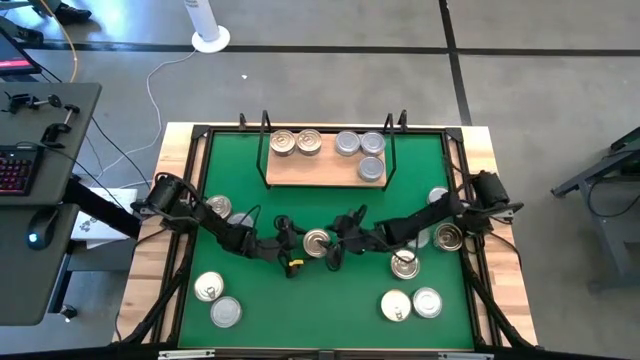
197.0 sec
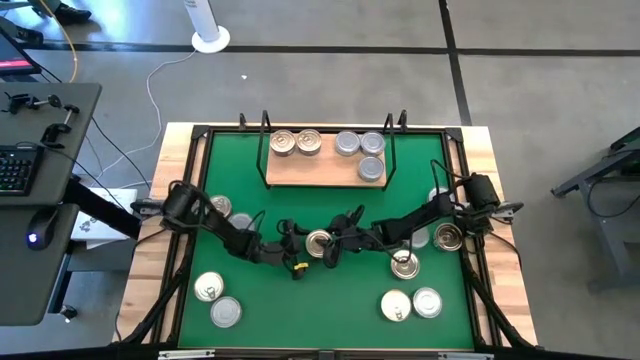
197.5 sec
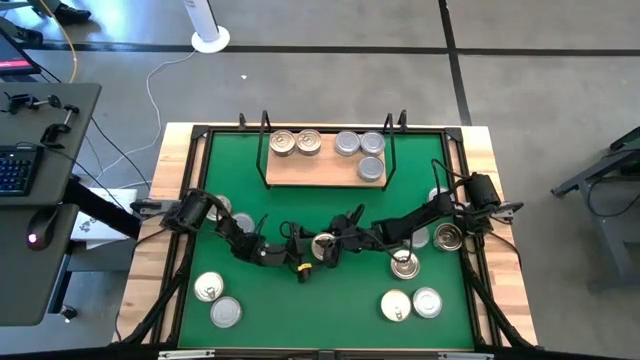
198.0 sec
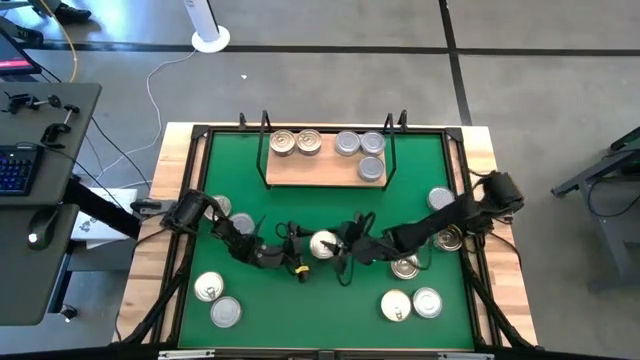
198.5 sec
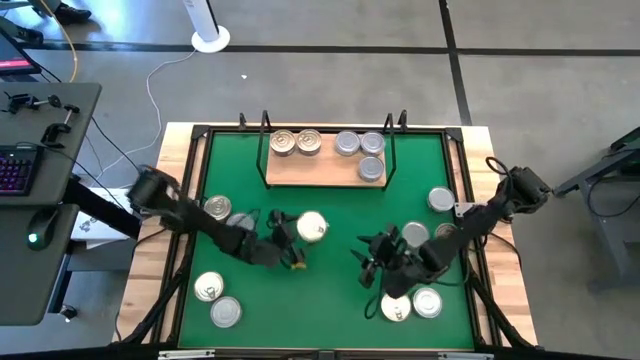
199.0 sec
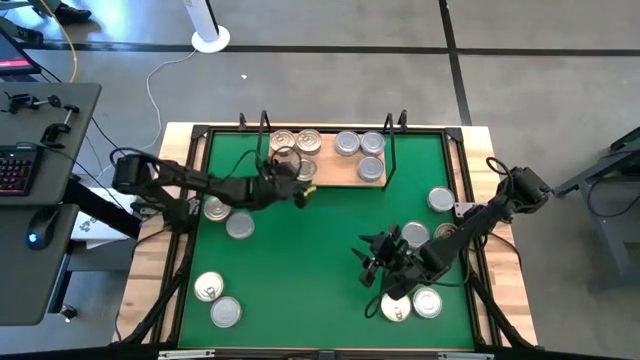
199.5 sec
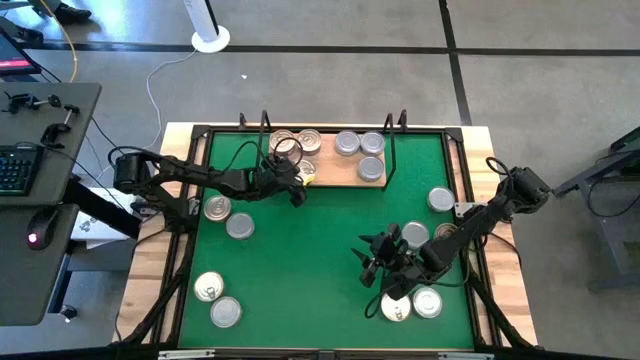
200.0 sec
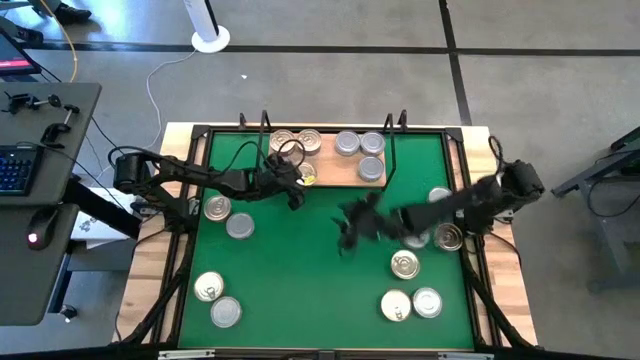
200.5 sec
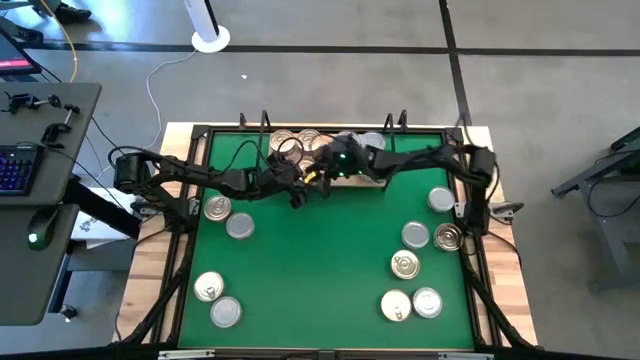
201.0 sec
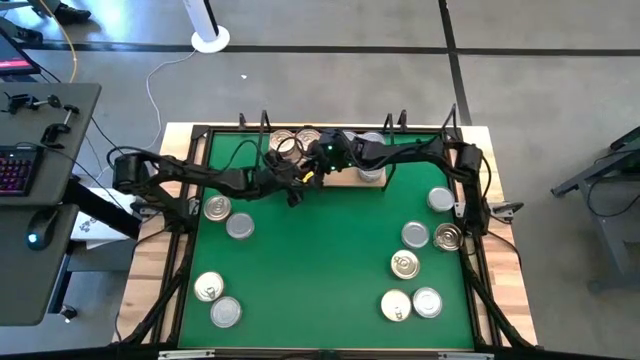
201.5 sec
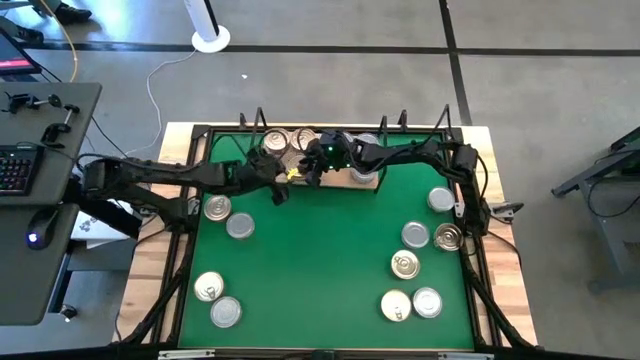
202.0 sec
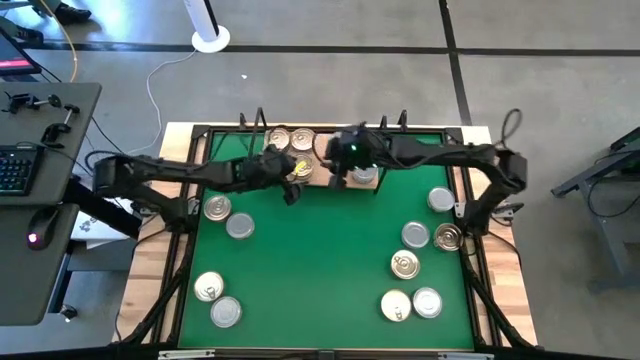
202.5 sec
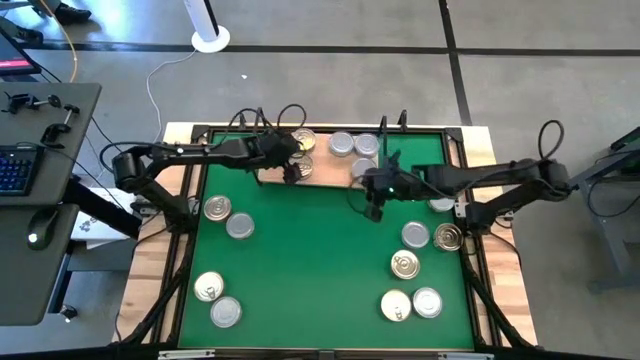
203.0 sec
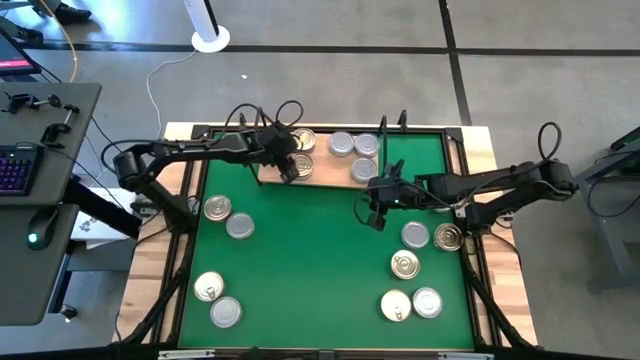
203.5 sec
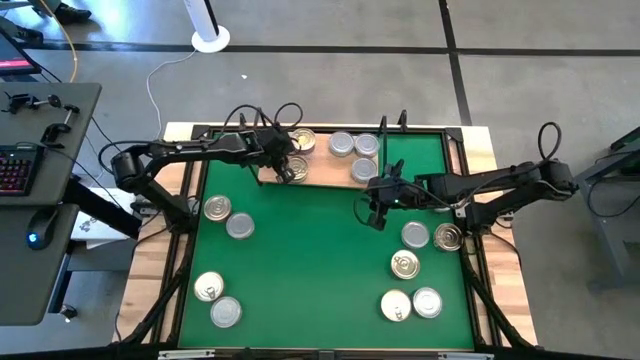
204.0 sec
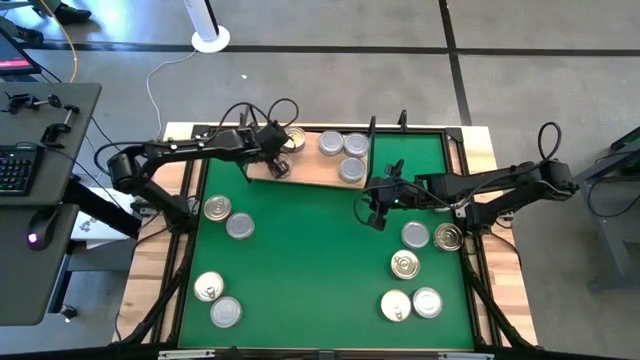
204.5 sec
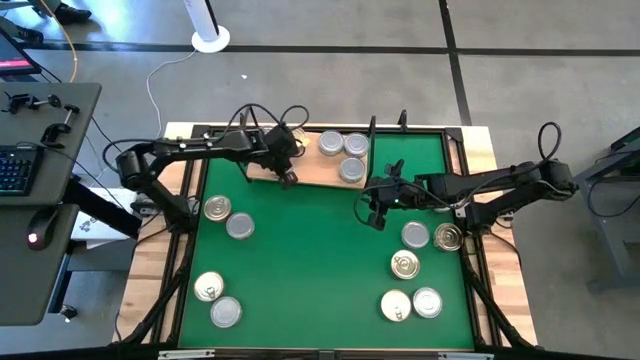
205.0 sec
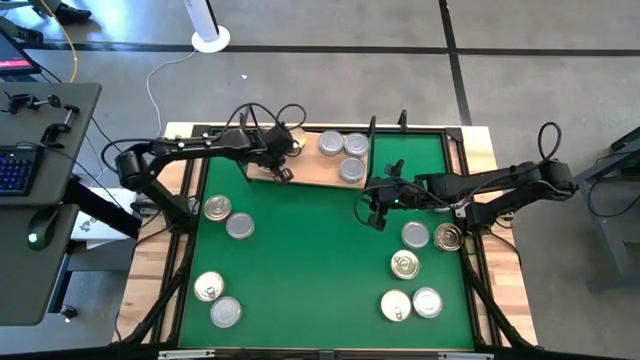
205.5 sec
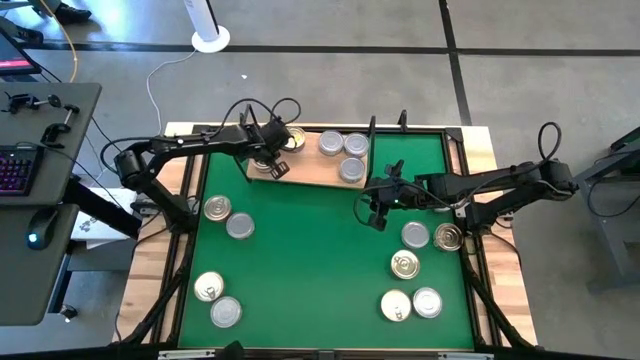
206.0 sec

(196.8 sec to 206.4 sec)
Task: Stack canned seafood by type on shelf
Put the blue/pink tuna can on the shelf and align with the other blue/pink tuna can

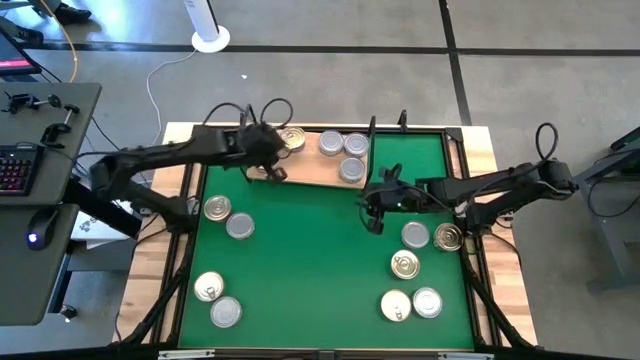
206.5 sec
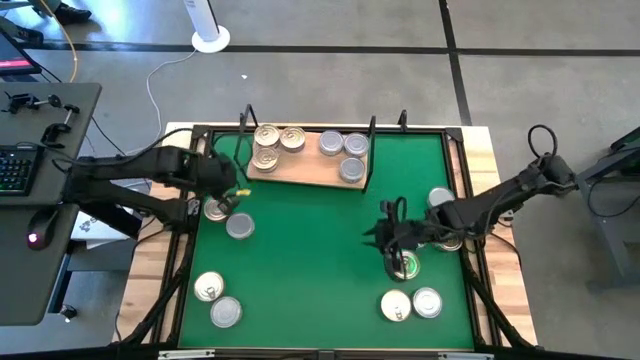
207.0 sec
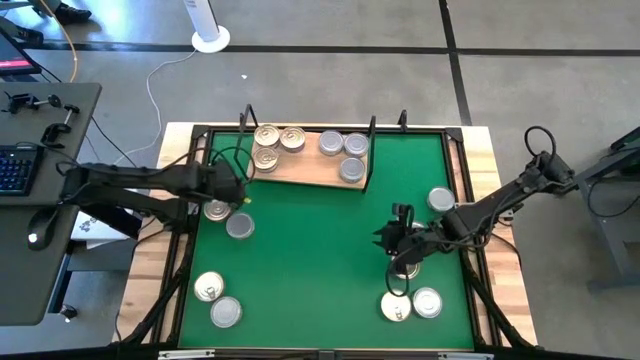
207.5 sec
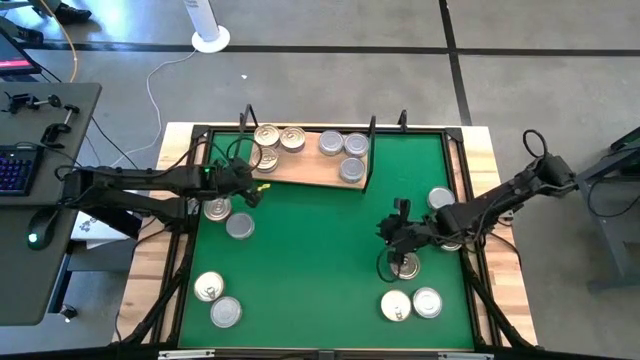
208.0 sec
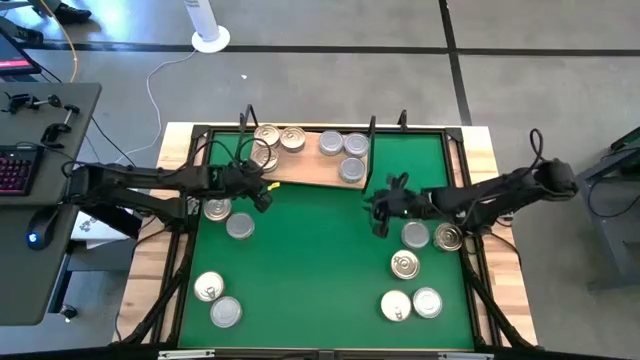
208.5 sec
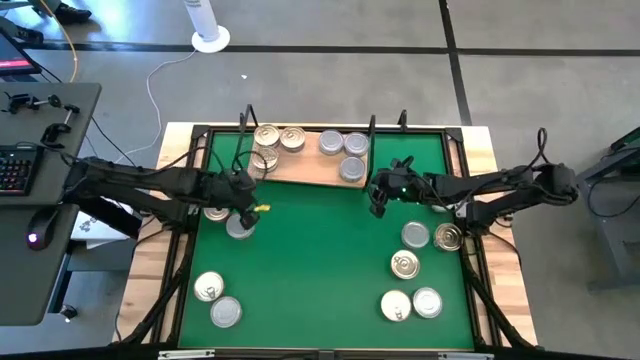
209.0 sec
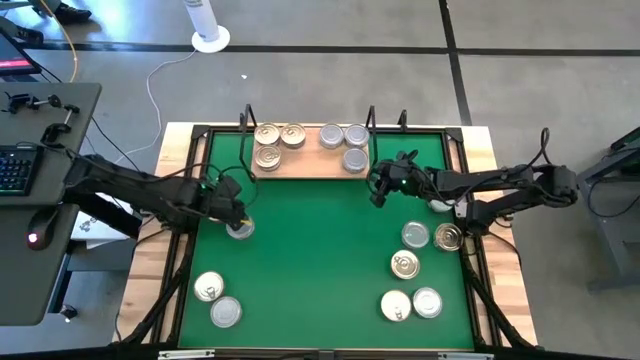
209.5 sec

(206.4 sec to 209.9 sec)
Adjust the shelf

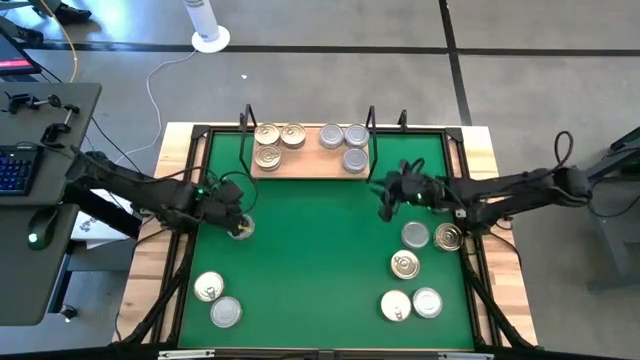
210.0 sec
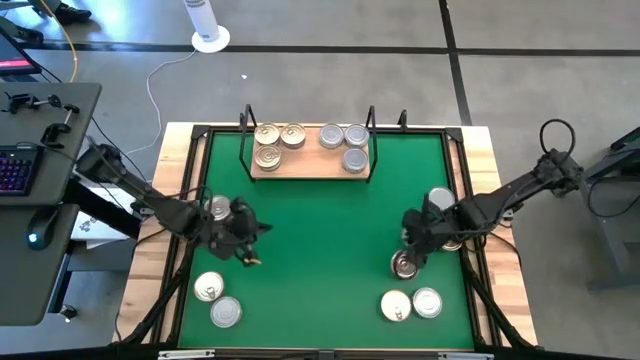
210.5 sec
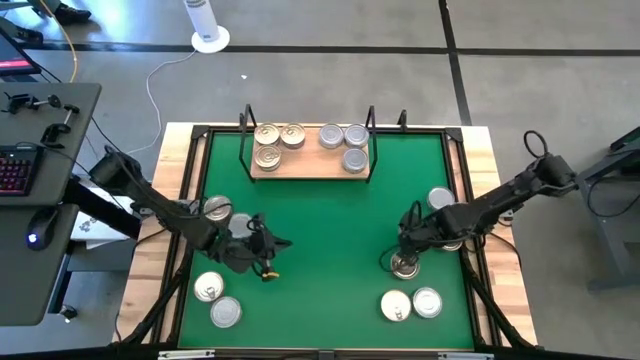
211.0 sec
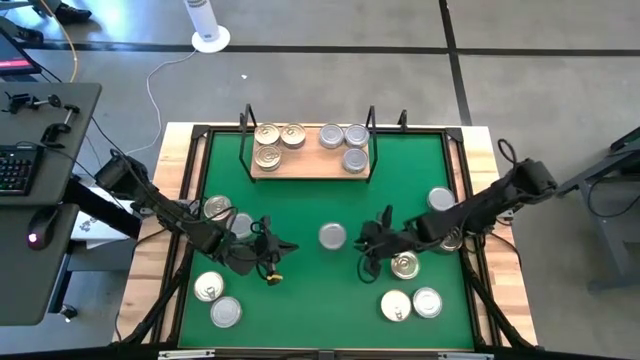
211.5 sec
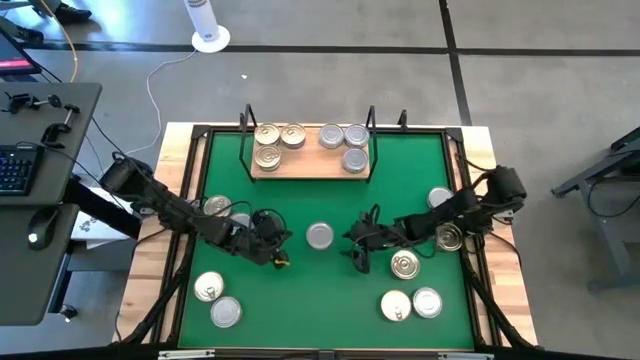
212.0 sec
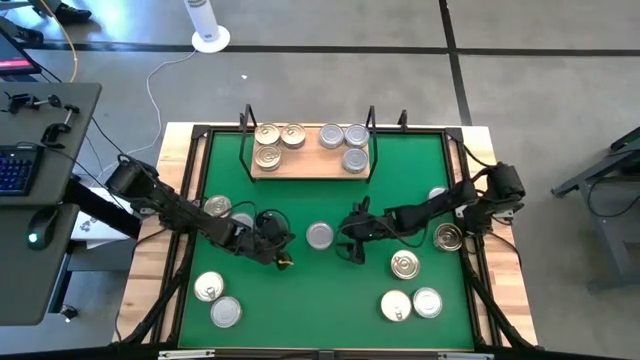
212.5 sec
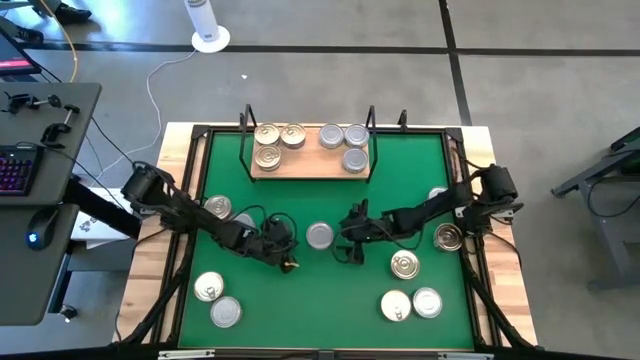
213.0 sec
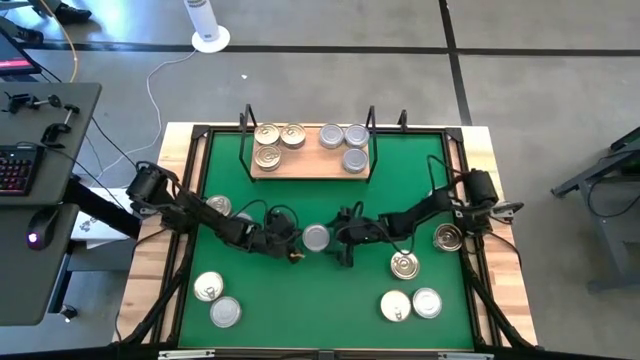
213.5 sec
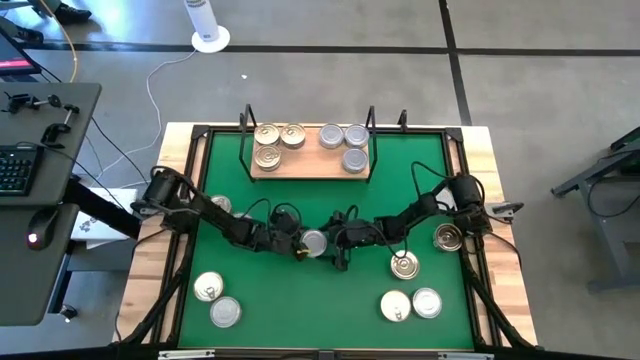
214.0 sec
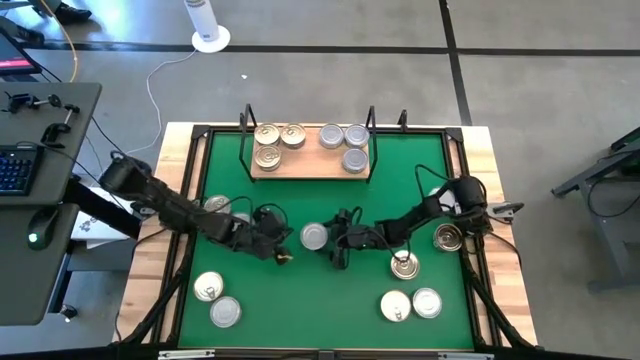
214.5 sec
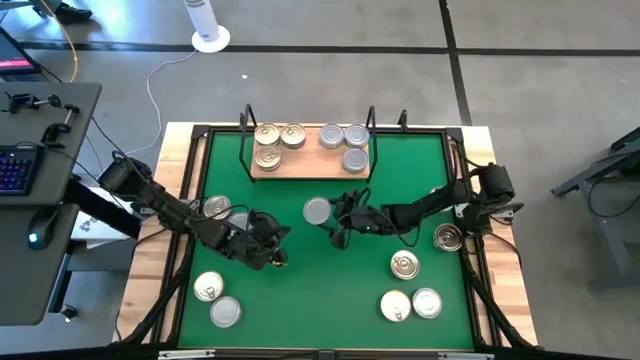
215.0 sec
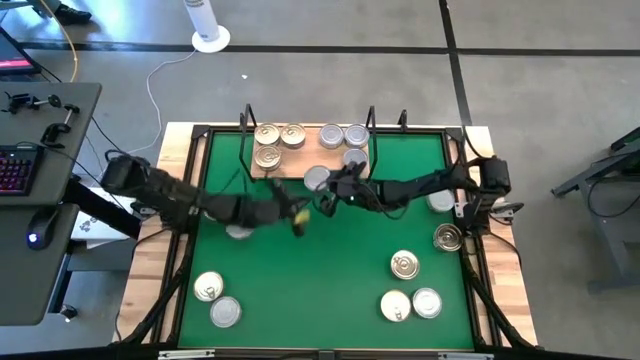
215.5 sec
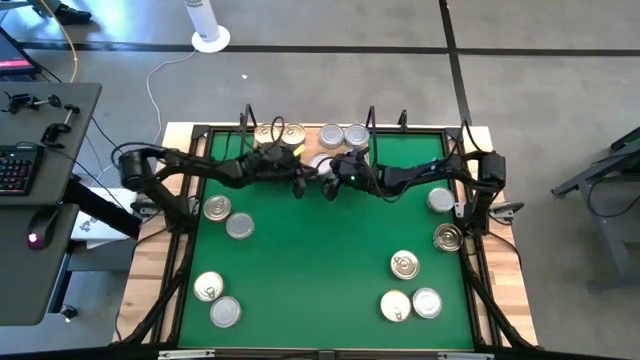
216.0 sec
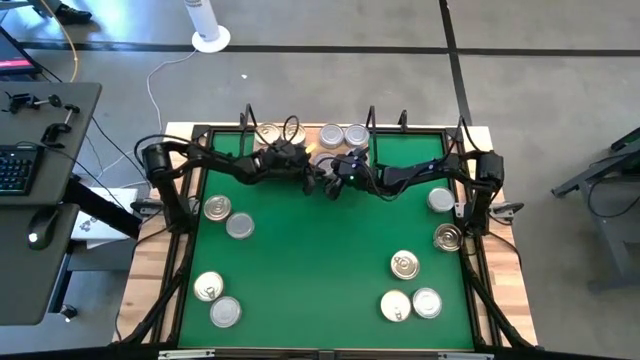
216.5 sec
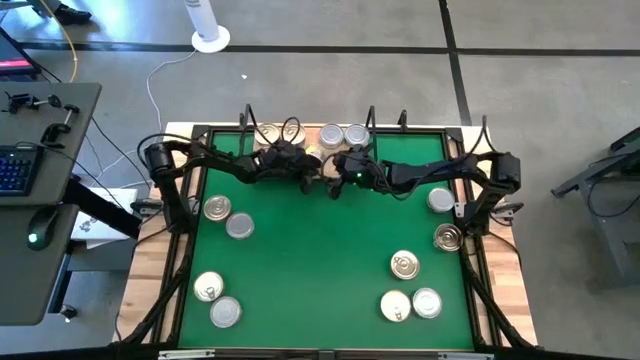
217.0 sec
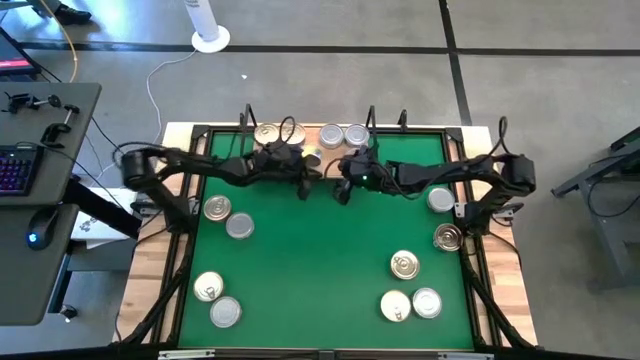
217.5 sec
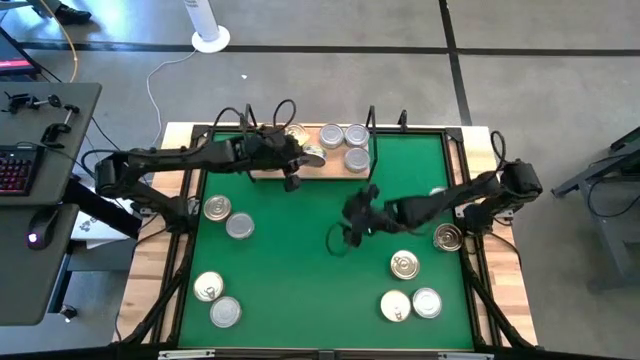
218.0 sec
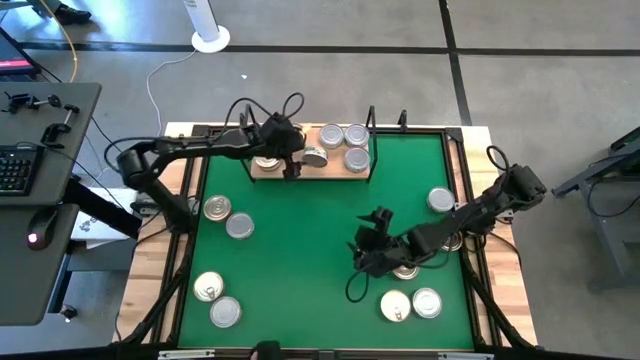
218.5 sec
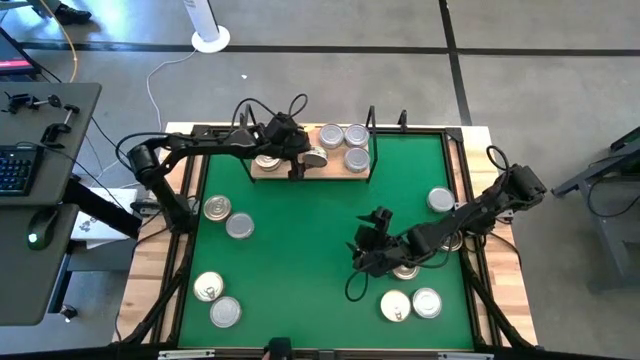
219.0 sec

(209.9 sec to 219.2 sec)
Put the green tuna can on the shelf and align with the other green tuna can
